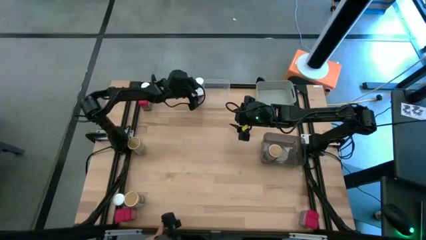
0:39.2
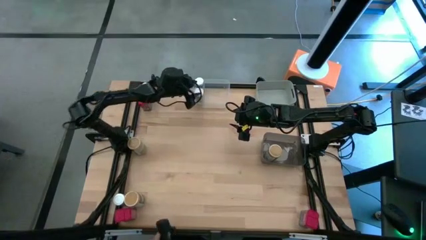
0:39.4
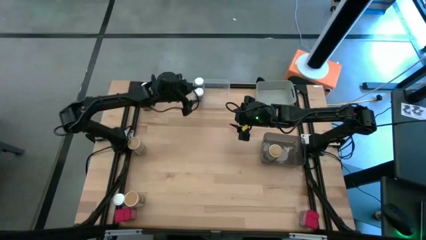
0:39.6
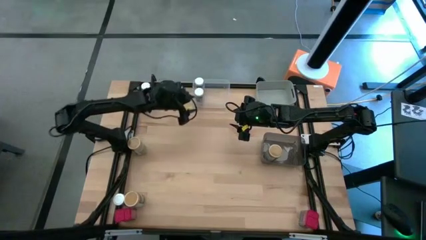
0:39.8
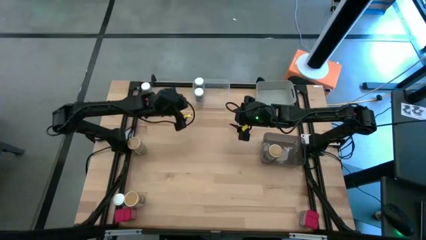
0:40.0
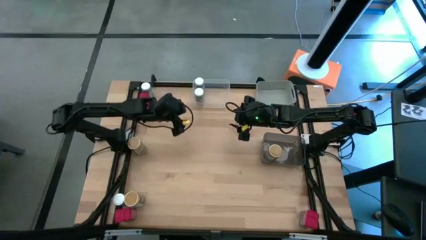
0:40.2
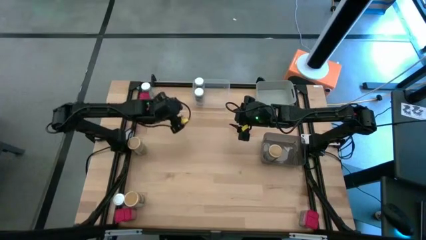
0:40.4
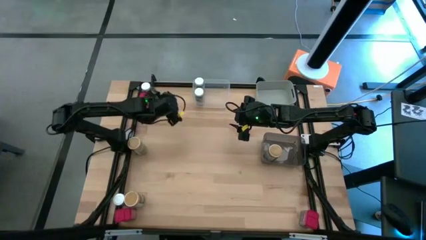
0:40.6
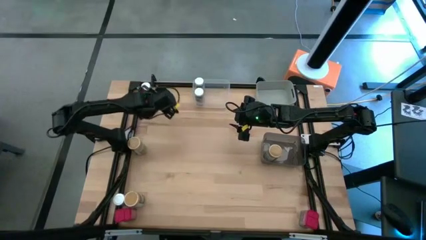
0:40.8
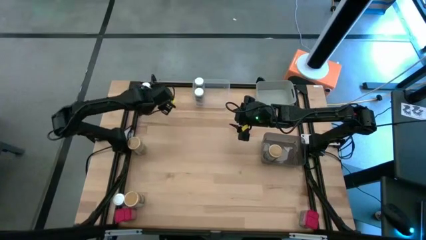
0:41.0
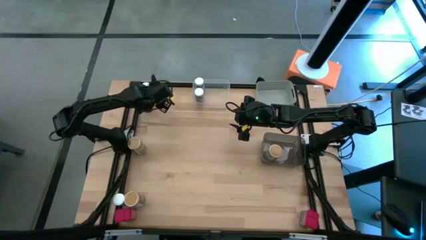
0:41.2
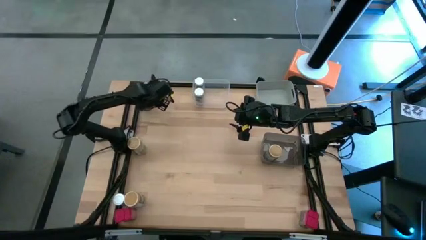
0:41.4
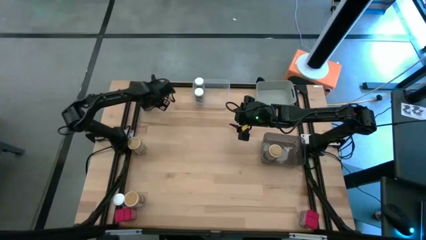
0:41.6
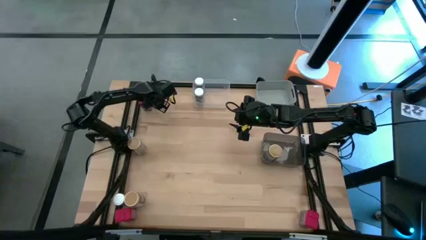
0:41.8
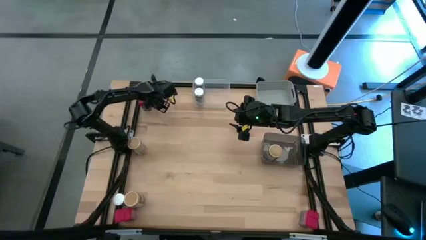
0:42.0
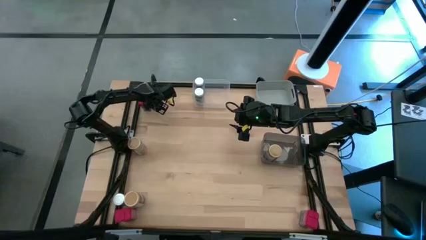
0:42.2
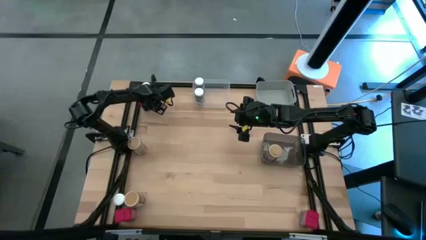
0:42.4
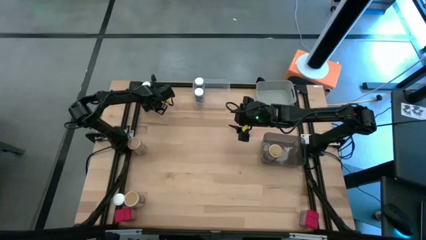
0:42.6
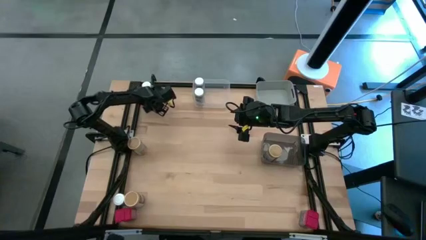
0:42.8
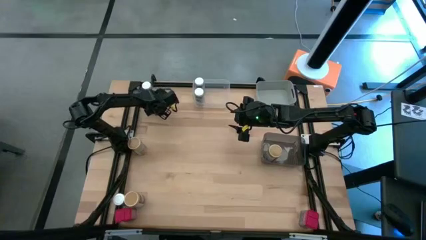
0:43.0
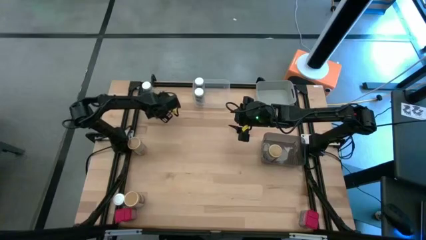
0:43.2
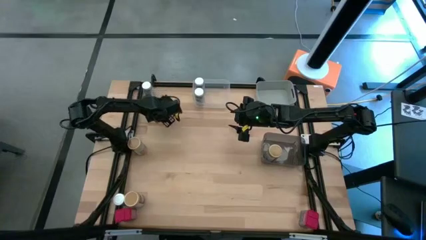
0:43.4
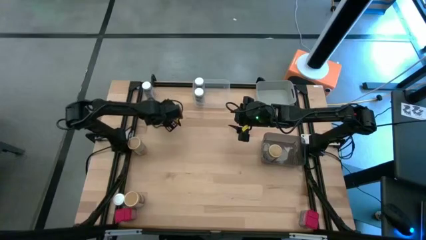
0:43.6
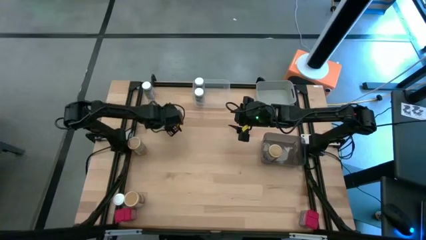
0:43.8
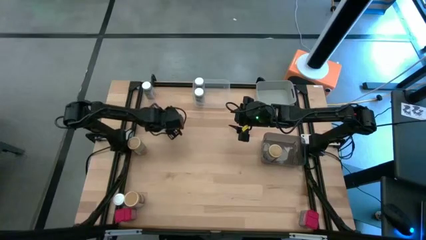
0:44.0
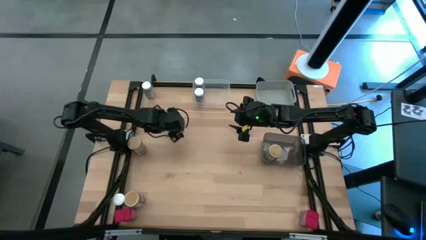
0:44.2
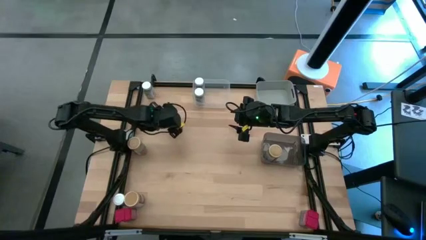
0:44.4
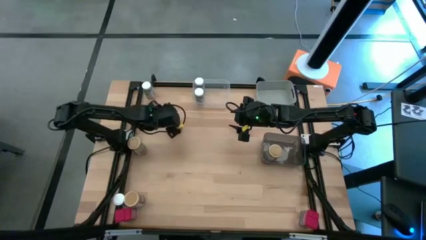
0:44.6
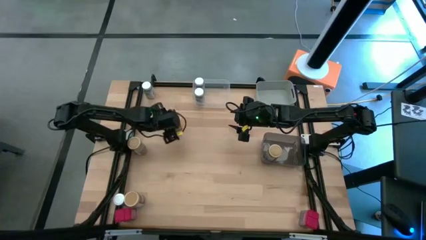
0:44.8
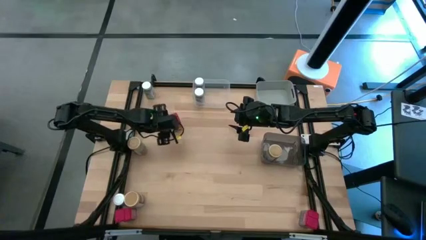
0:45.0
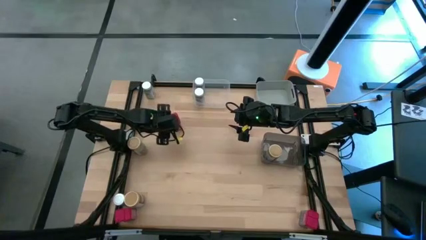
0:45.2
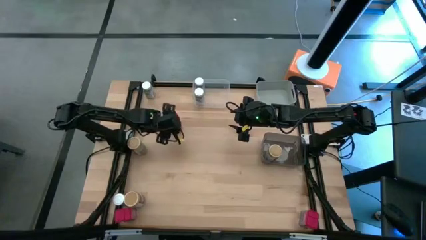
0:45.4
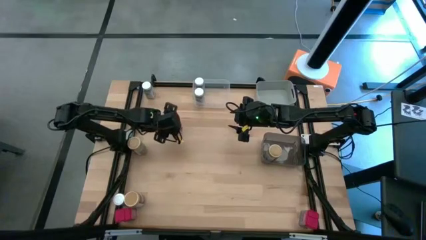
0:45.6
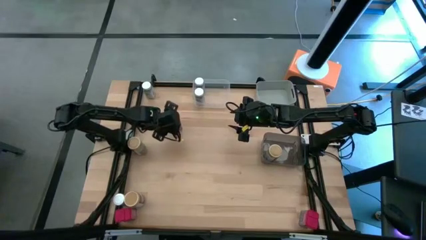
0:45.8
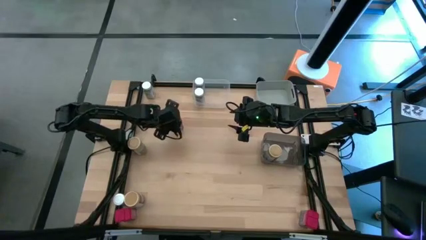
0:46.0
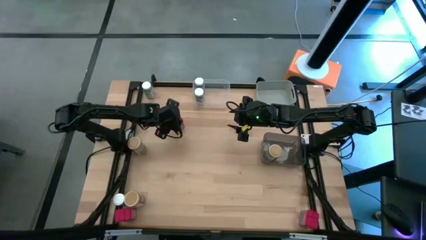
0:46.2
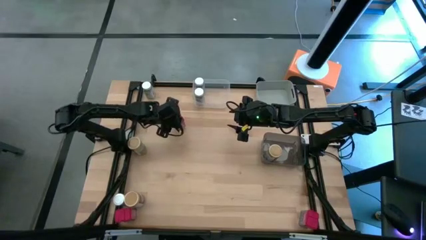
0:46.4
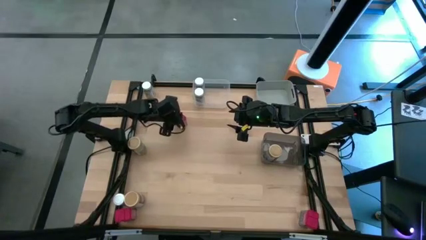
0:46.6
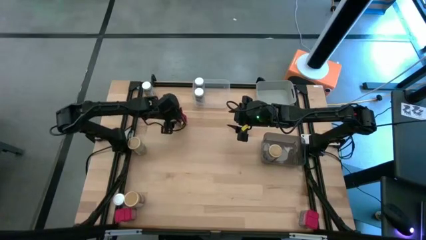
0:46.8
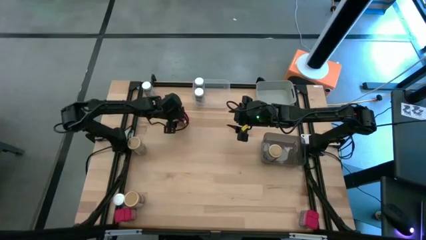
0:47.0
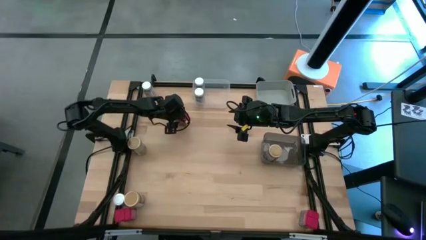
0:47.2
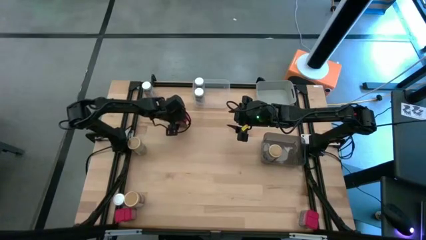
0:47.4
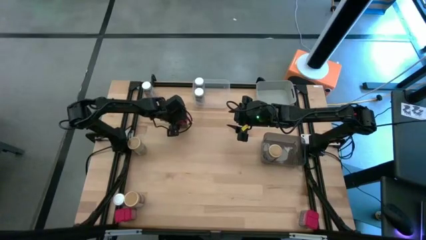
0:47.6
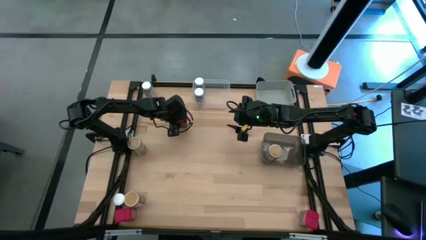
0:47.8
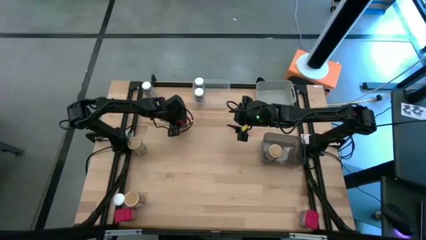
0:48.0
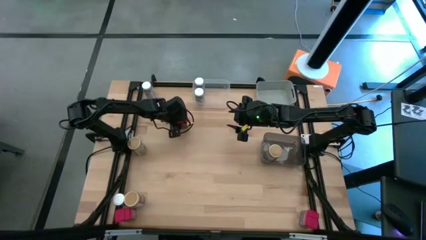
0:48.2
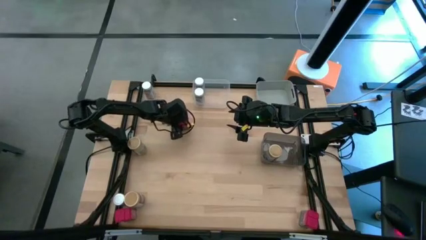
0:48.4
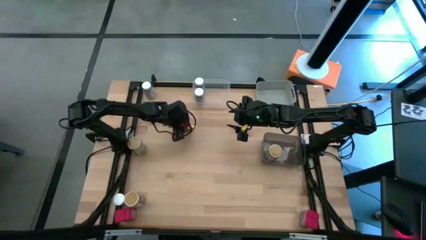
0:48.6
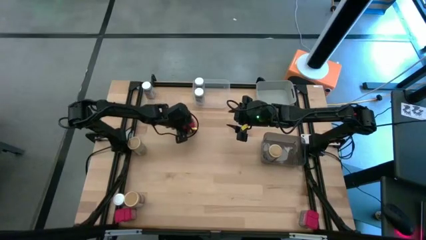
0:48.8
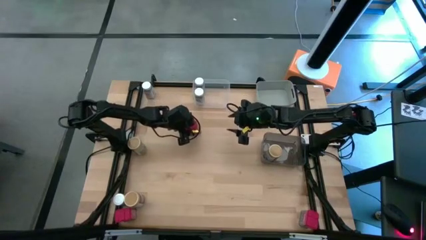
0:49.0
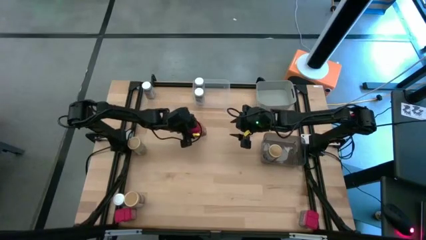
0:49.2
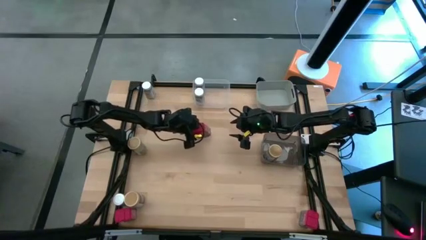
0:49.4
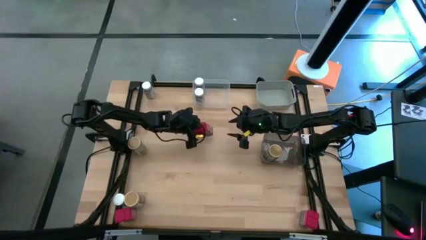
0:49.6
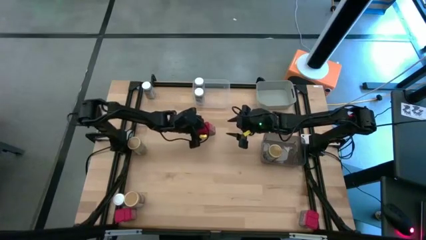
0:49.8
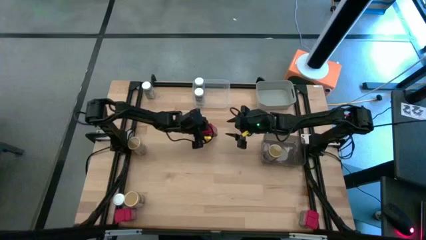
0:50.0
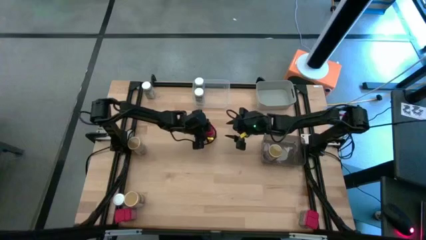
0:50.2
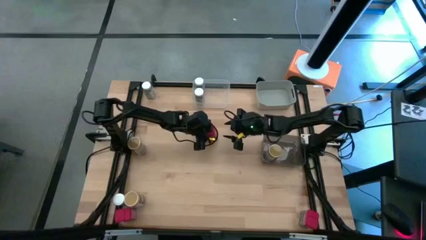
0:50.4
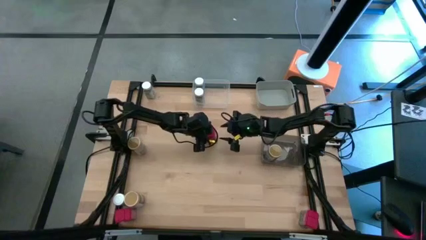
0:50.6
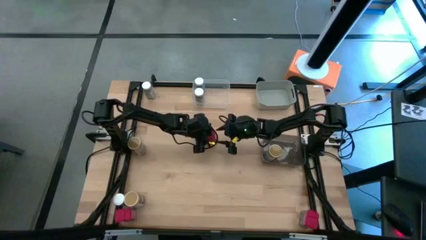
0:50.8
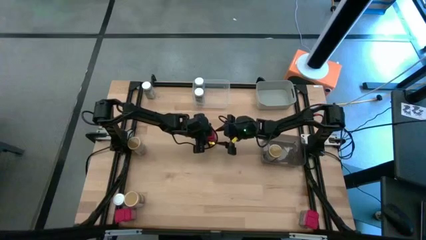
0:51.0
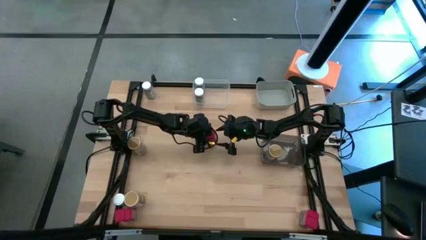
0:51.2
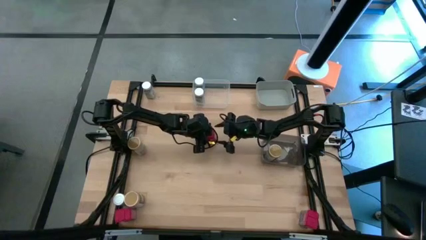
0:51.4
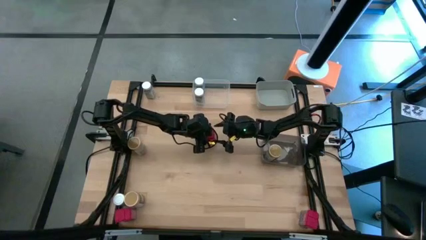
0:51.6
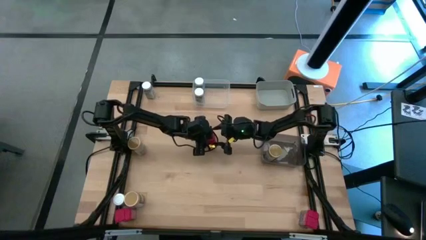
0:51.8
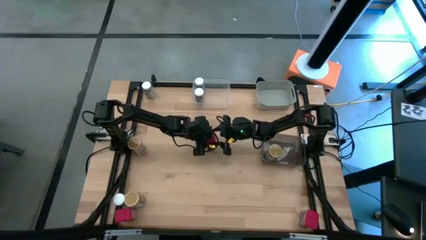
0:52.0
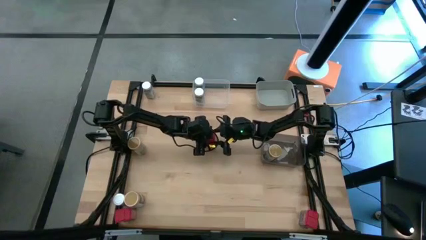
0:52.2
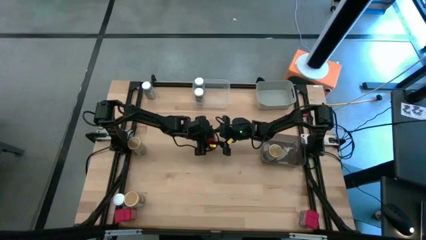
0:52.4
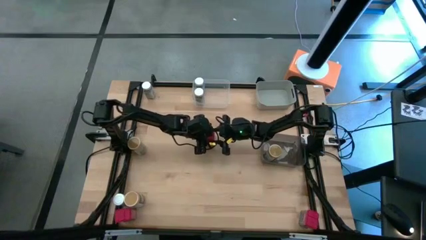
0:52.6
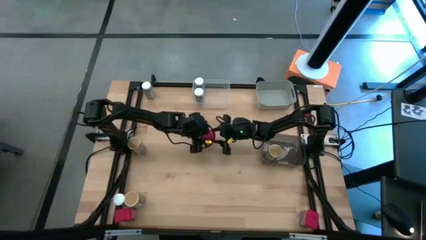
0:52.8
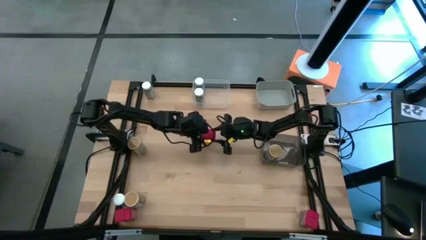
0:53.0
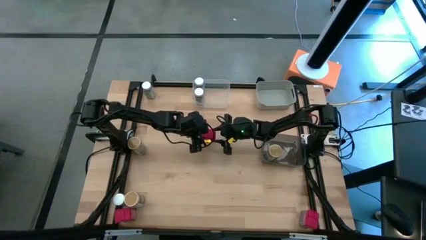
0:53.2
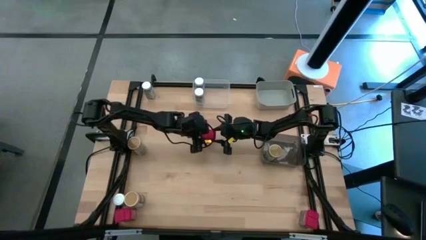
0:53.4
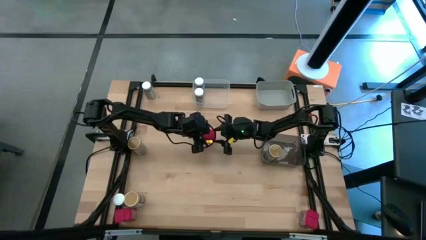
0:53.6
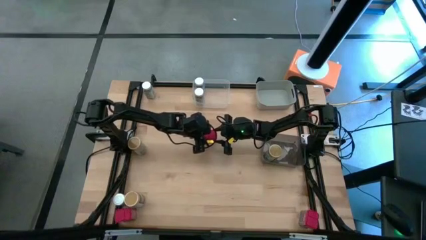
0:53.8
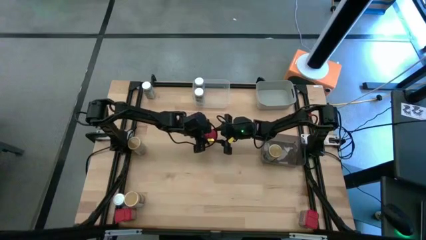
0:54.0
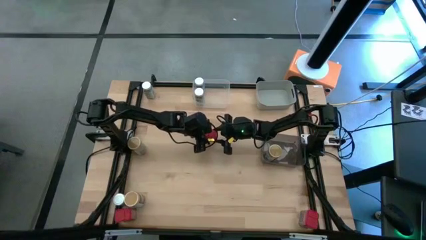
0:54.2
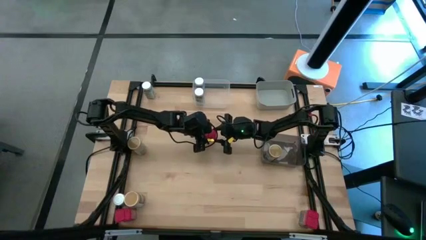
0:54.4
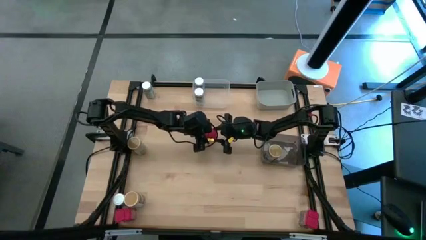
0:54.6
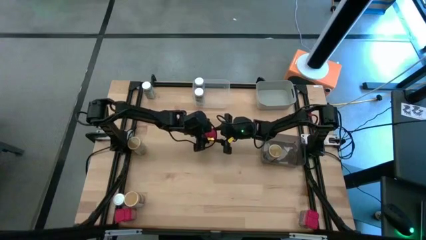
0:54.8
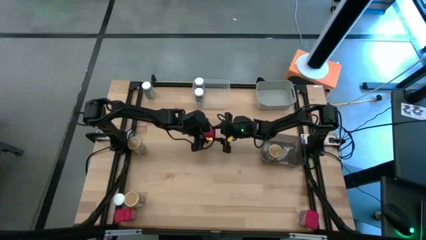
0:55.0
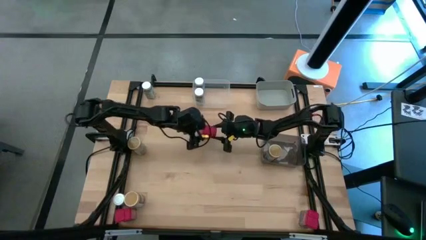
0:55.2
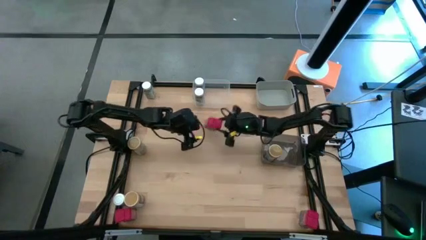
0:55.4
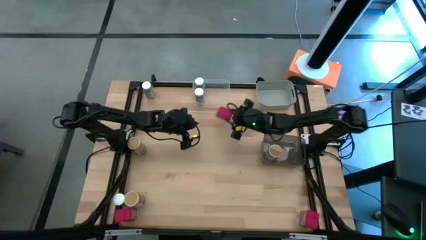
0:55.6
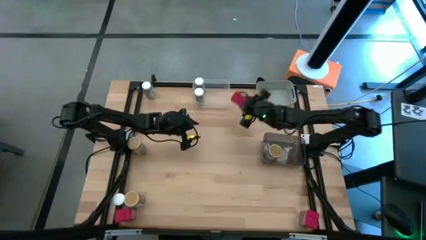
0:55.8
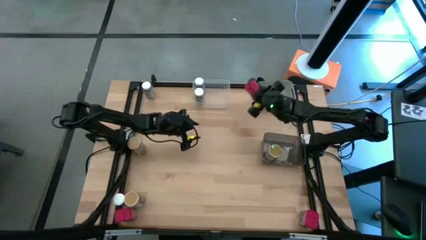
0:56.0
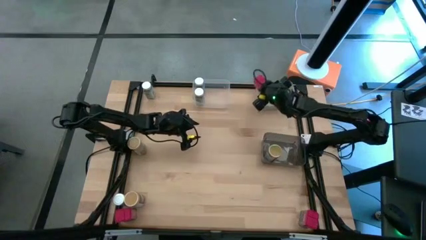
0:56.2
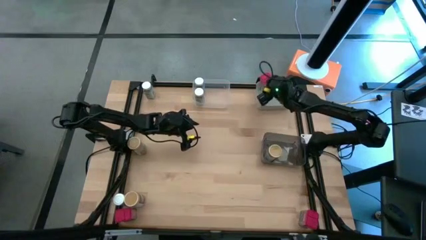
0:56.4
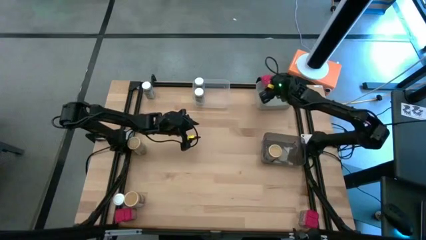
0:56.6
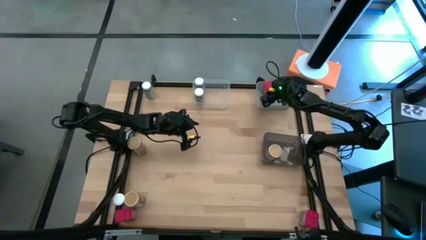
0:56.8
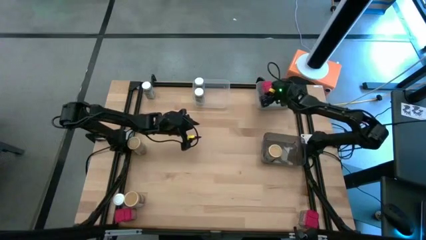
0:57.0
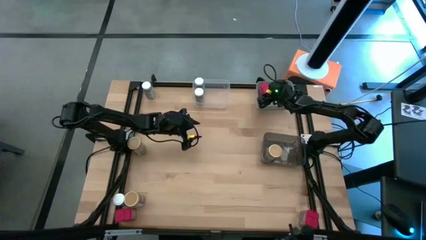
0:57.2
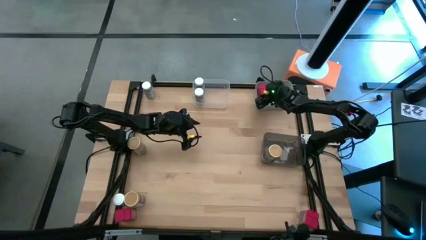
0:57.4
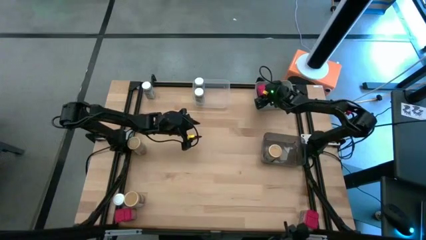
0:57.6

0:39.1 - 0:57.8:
Task: Sort spices by type
Put the top left red seasoning can into the gray bin
